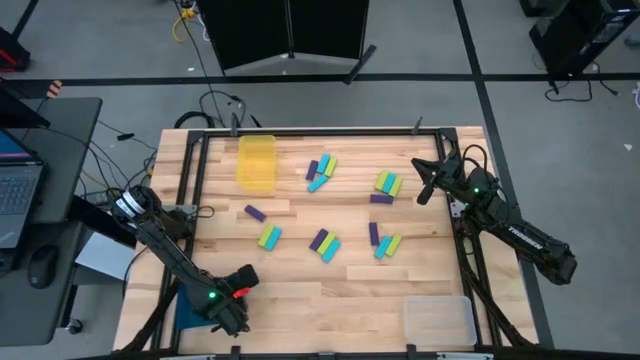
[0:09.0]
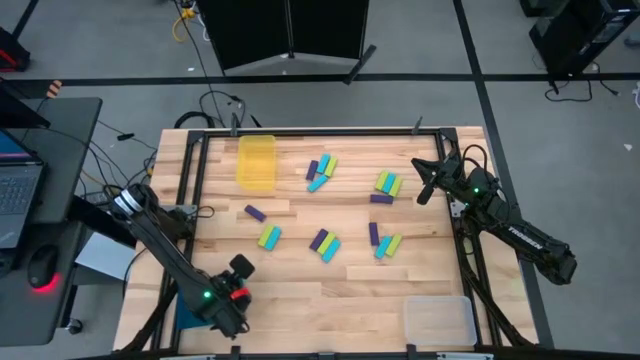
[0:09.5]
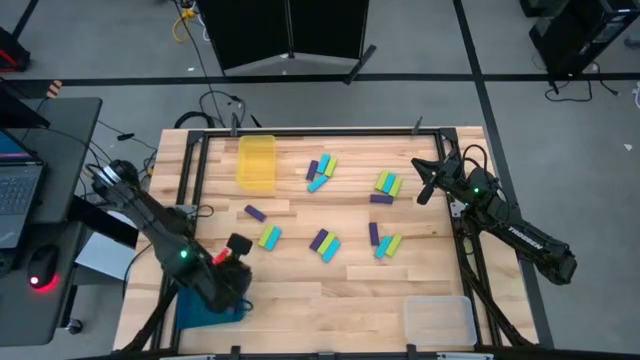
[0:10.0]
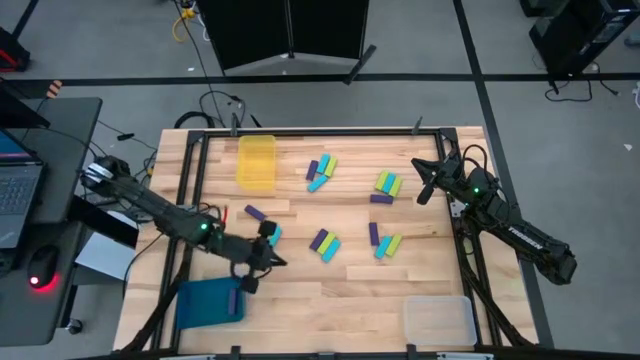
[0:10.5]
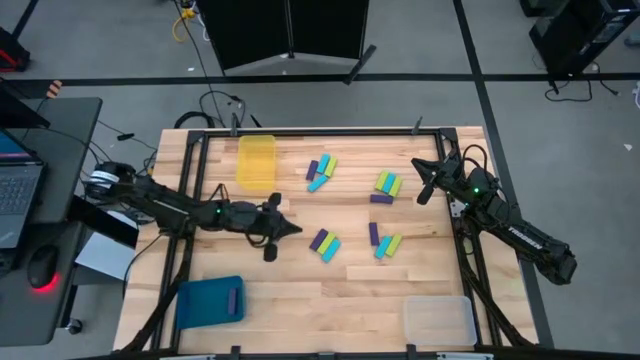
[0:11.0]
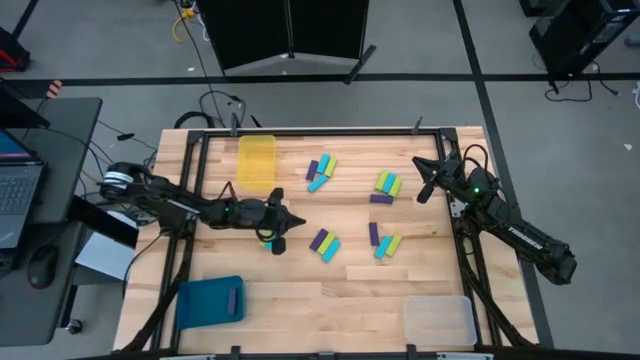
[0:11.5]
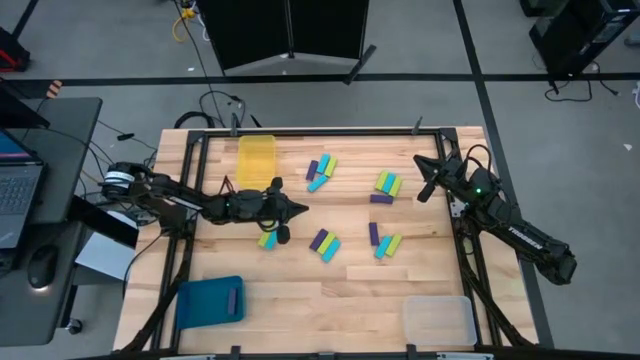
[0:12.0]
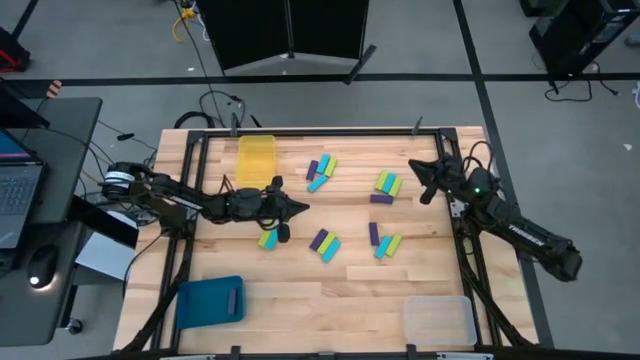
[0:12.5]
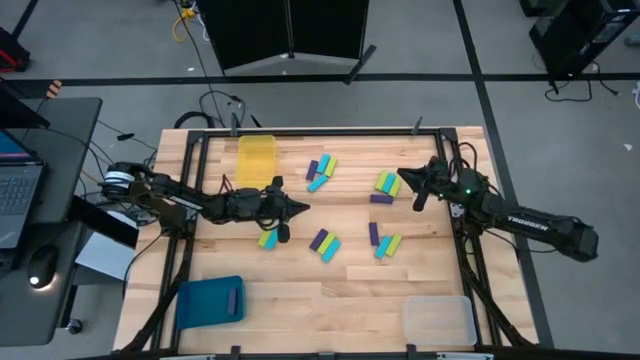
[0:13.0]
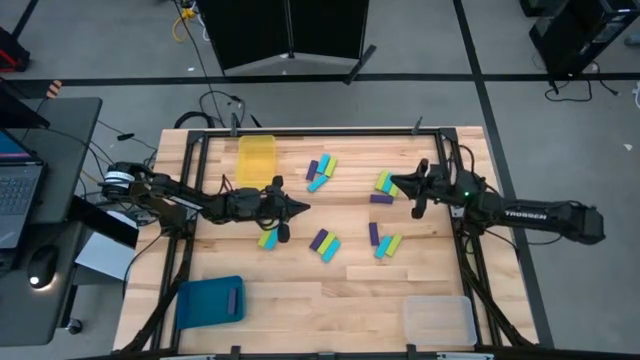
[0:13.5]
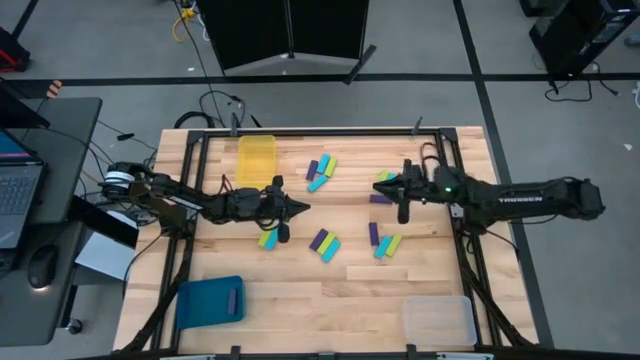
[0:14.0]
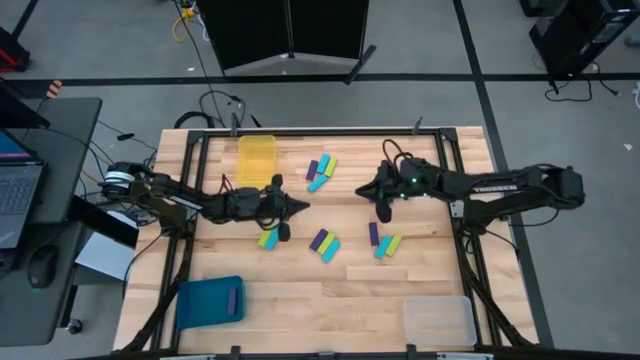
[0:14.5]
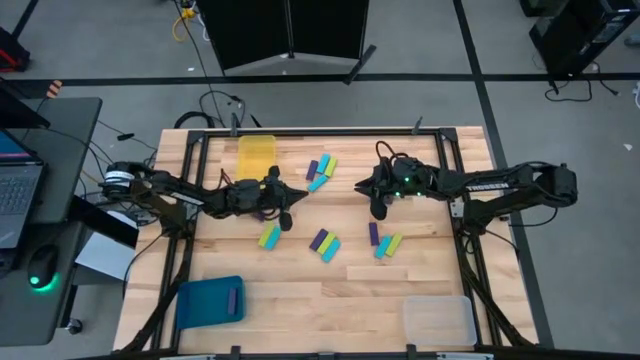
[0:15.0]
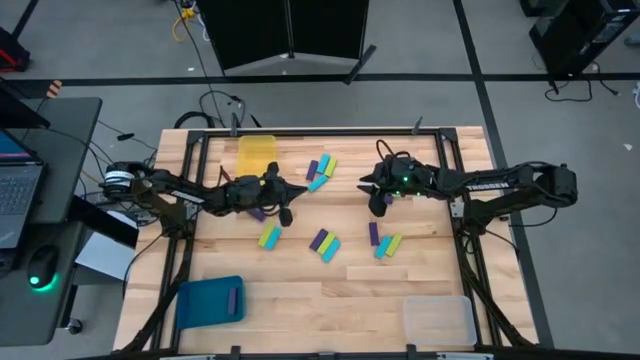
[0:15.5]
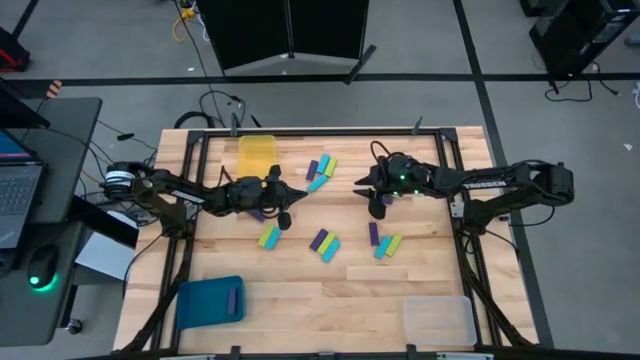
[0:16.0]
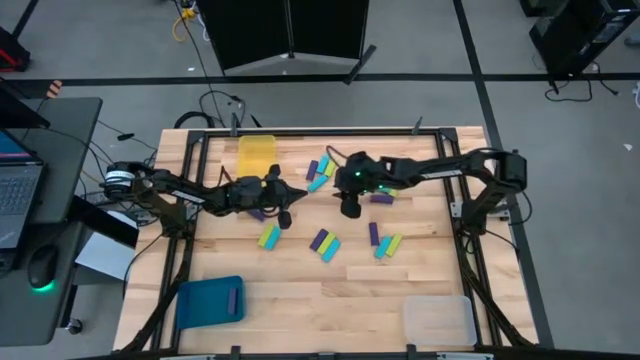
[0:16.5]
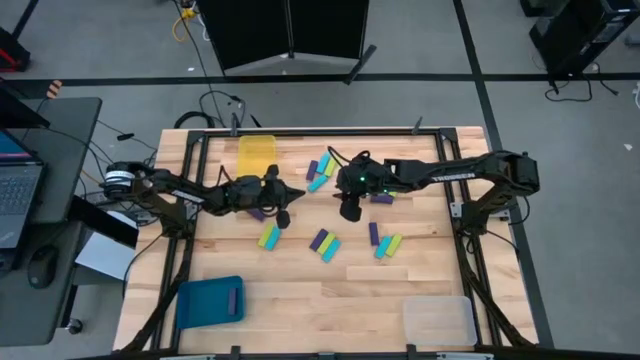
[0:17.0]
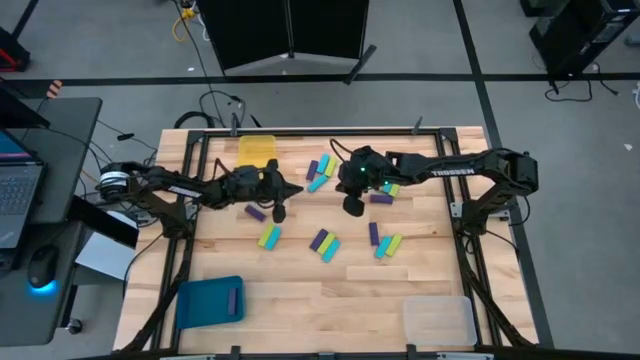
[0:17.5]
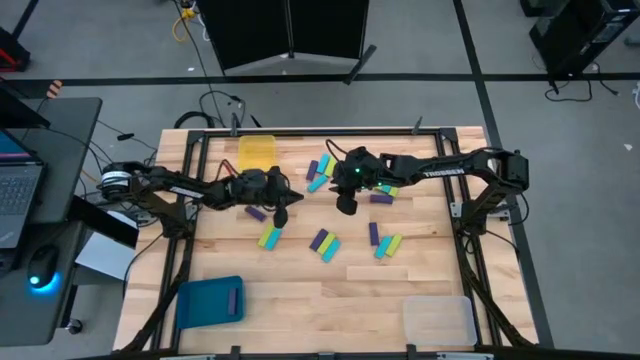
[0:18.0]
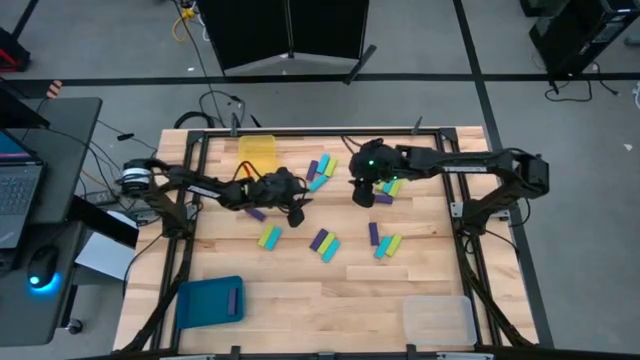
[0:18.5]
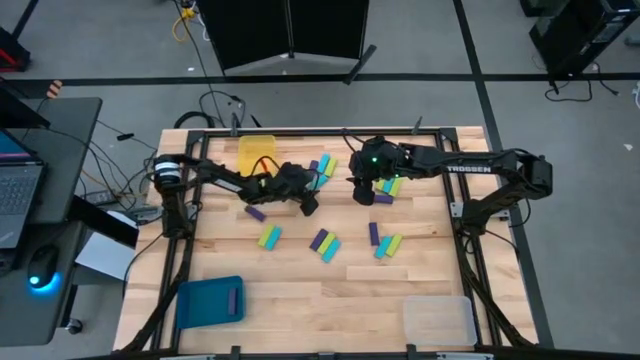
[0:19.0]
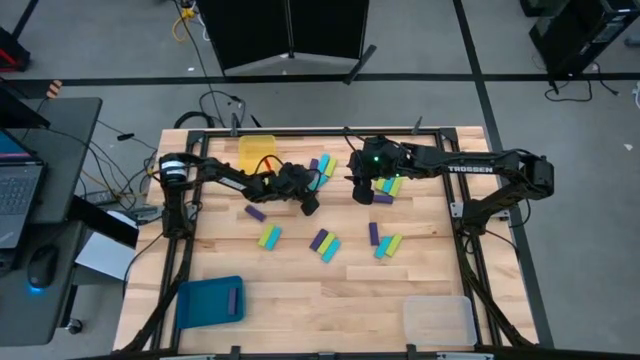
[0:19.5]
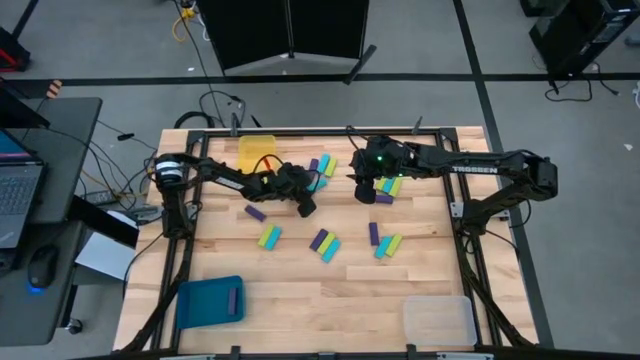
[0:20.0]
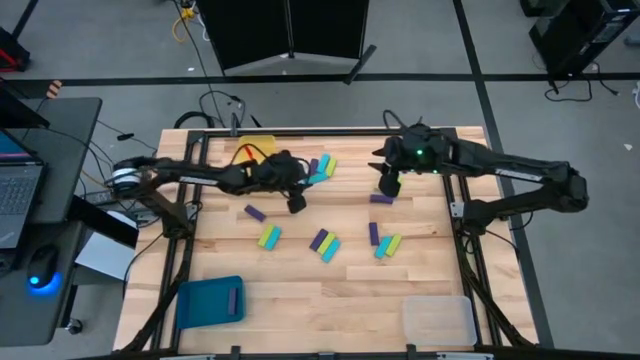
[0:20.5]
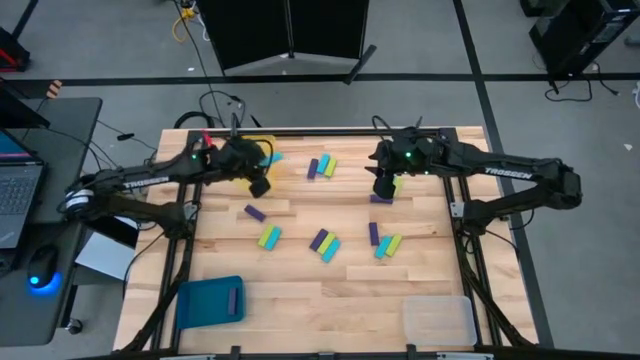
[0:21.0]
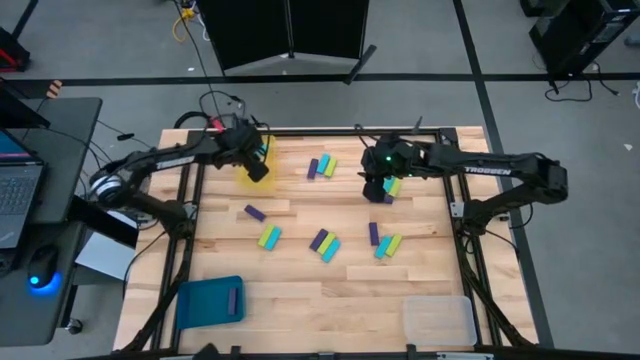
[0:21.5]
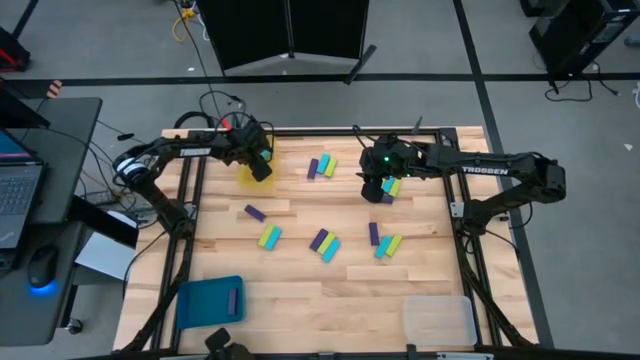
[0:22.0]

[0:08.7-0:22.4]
Task: Sort blocks
Put the blue block into the yellow bin

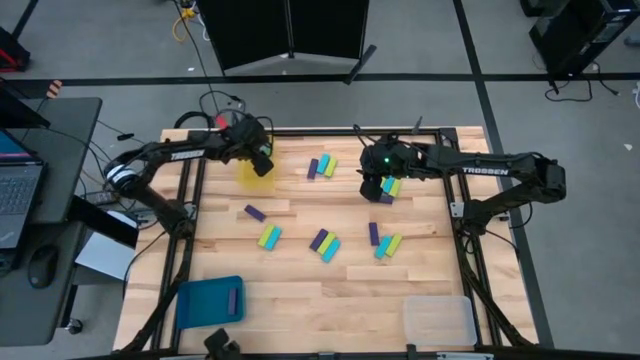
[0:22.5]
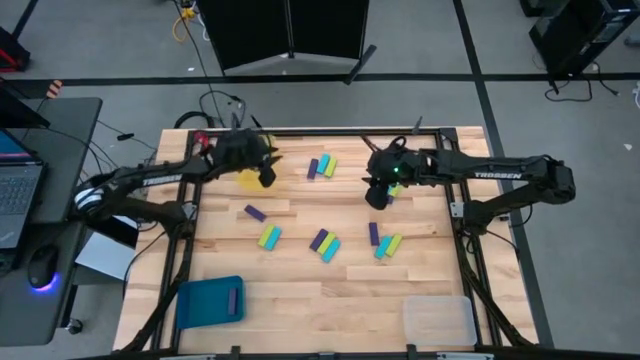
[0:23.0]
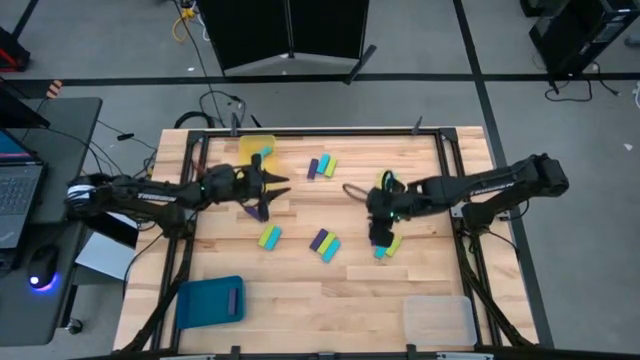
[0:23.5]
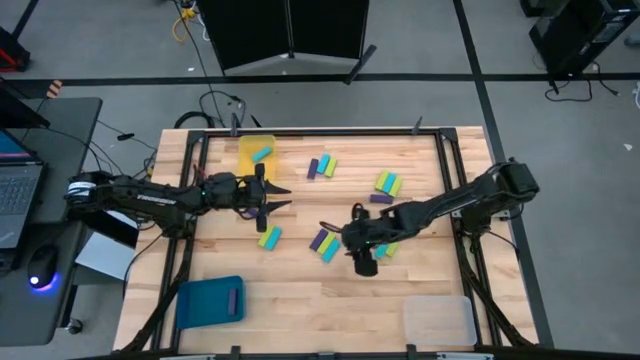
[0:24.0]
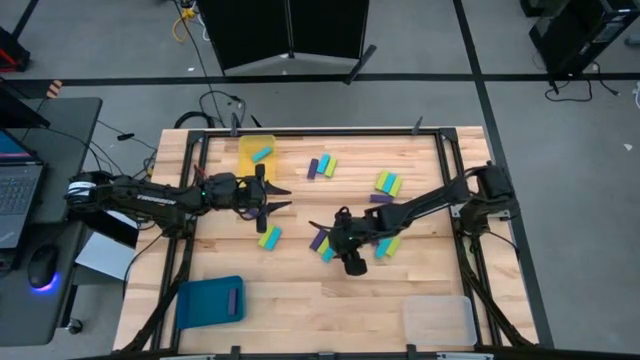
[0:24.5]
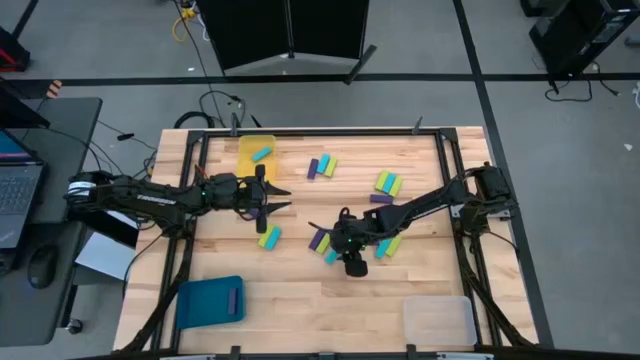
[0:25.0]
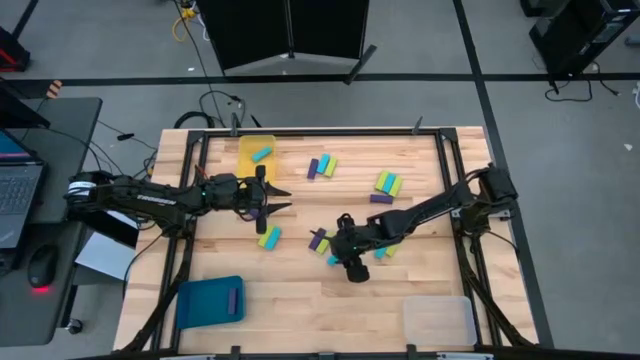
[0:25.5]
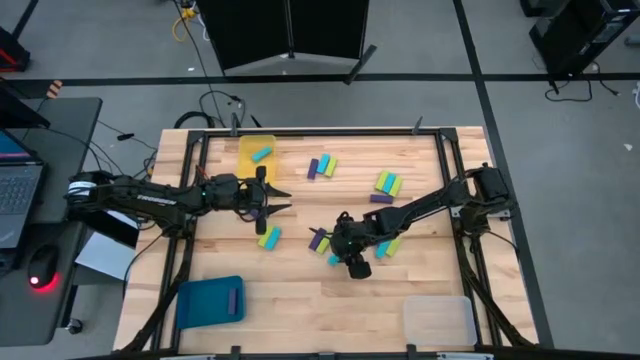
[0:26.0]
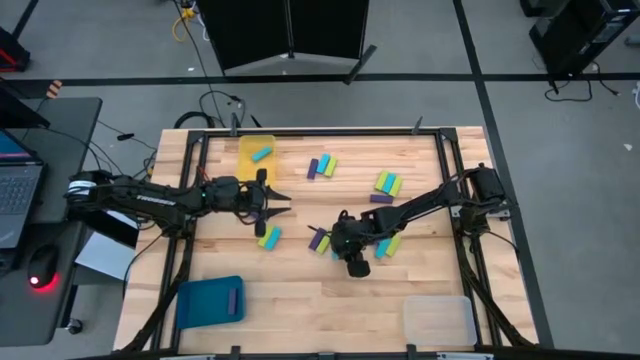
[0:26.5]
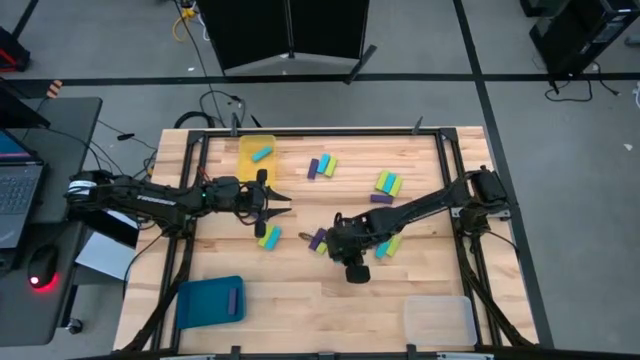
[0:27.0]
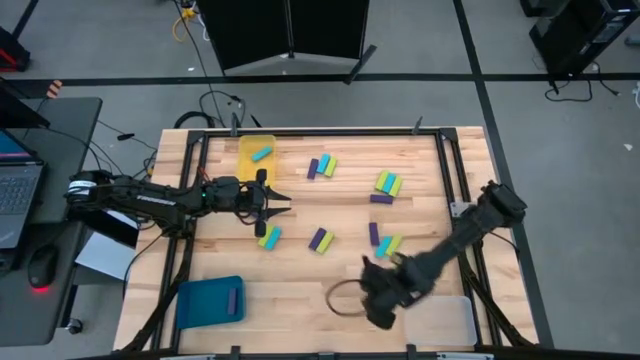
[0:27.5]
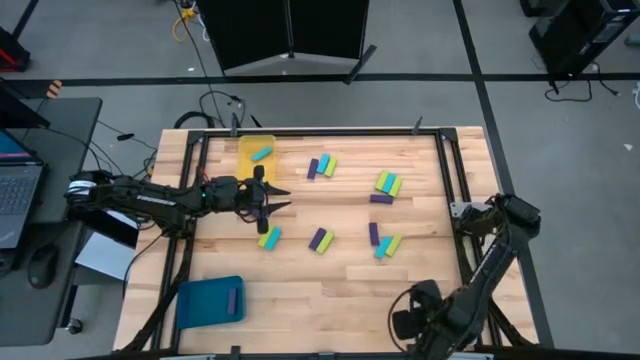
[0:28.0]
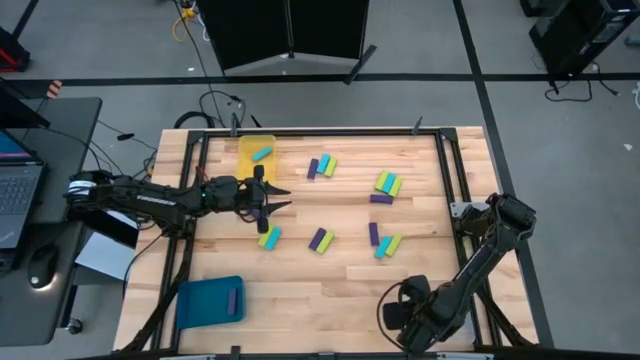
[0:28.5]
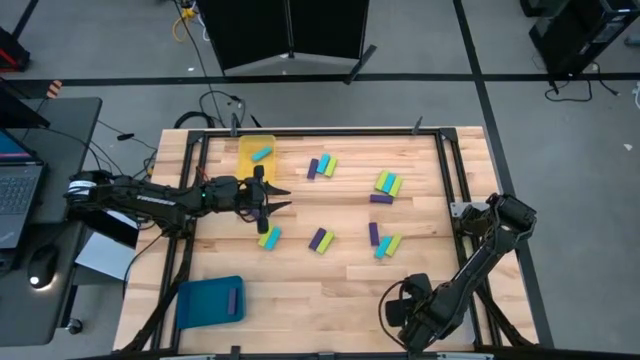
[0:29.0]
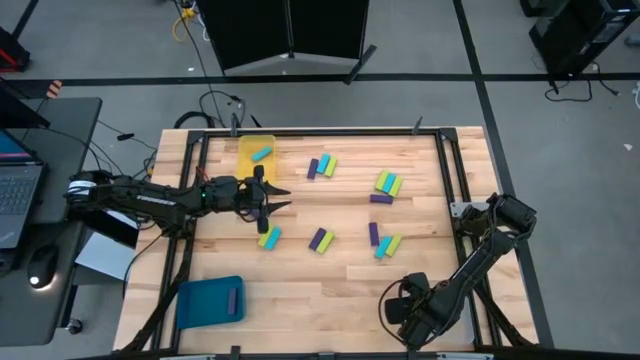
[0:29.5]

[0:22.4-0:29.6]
Put the blue block into the yellow bin
